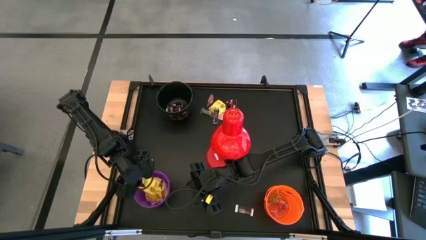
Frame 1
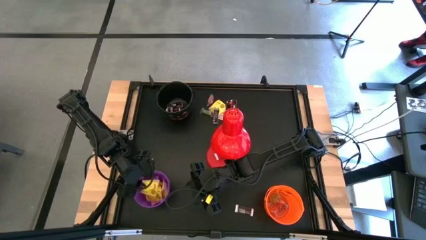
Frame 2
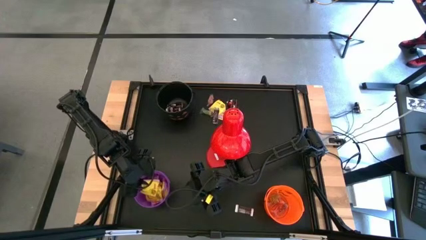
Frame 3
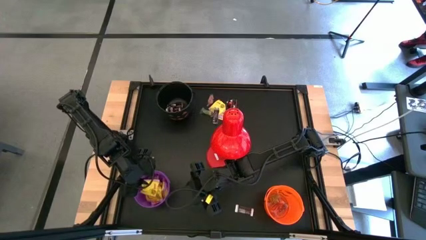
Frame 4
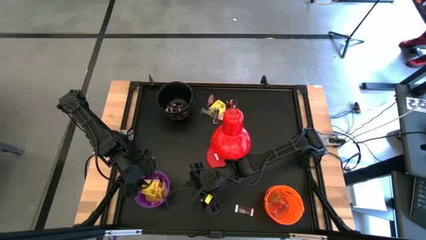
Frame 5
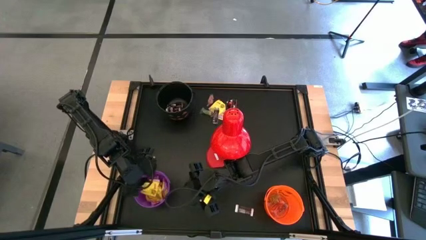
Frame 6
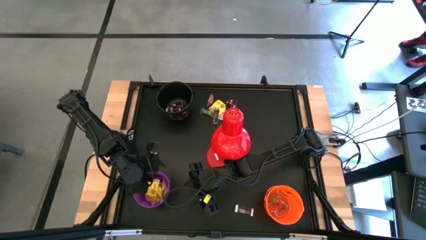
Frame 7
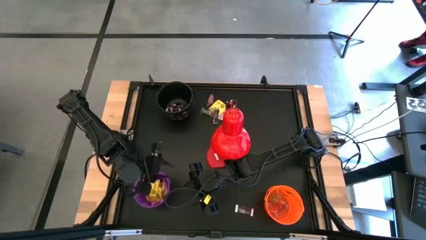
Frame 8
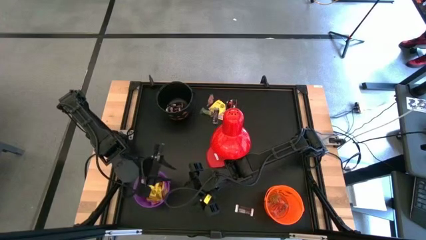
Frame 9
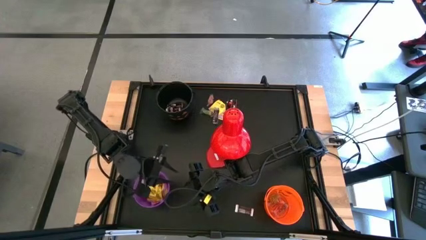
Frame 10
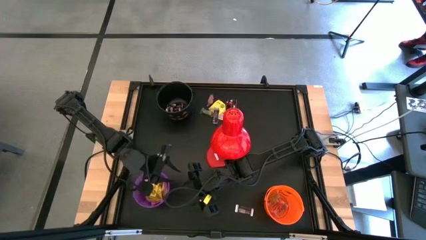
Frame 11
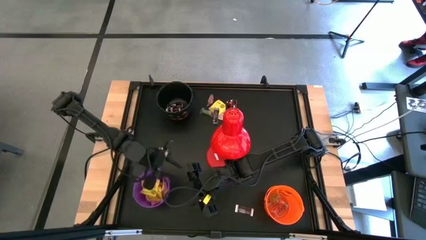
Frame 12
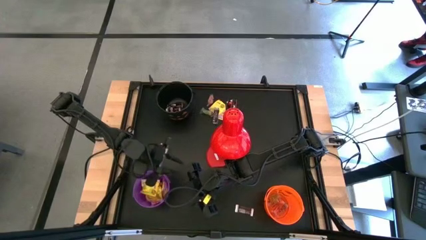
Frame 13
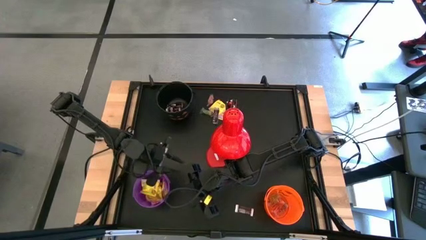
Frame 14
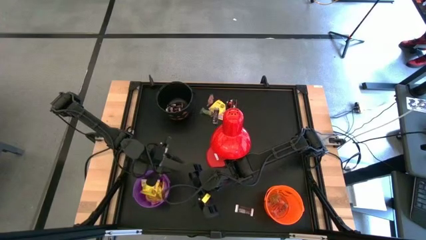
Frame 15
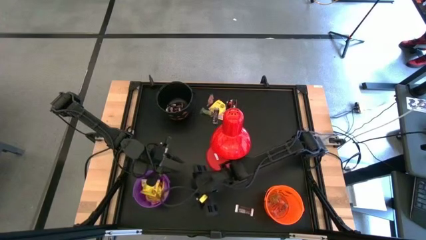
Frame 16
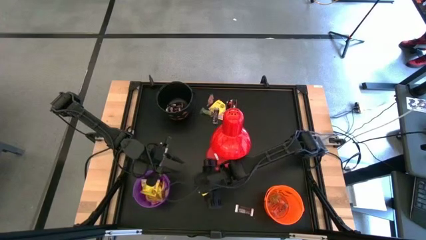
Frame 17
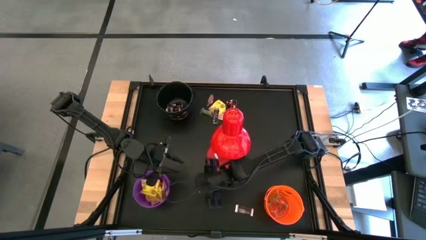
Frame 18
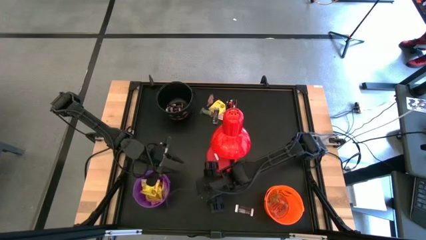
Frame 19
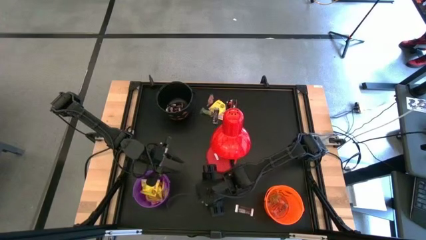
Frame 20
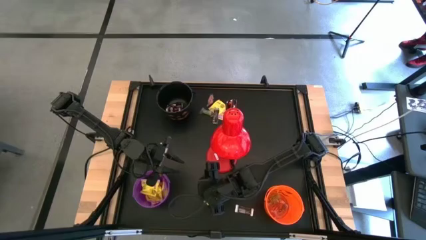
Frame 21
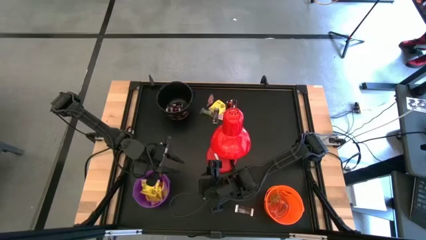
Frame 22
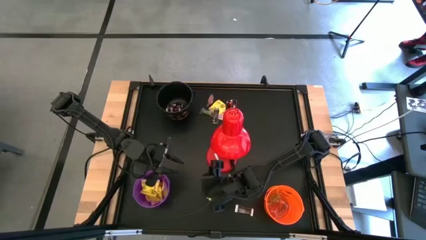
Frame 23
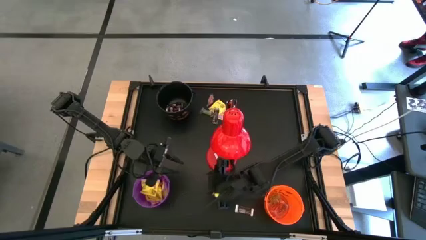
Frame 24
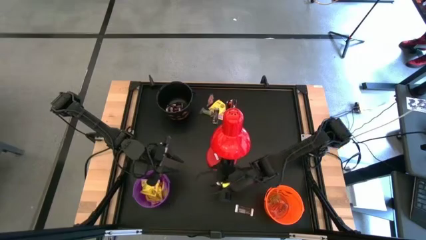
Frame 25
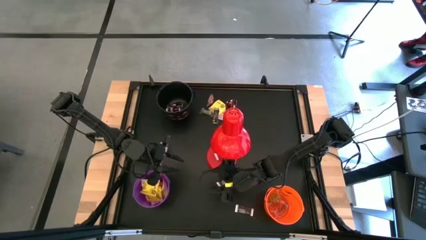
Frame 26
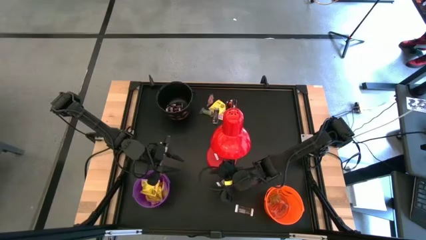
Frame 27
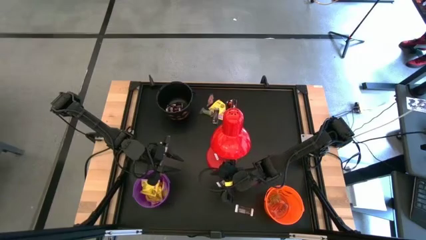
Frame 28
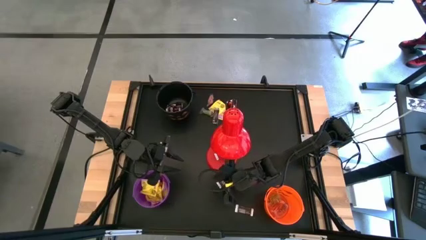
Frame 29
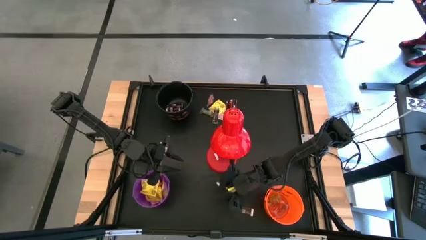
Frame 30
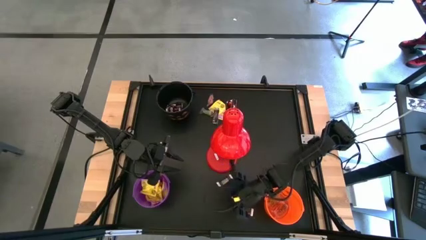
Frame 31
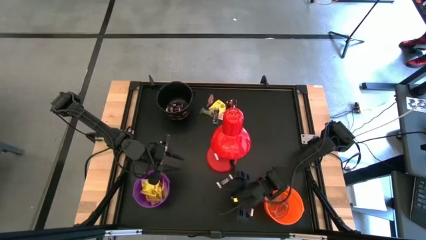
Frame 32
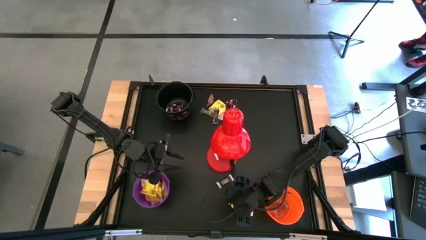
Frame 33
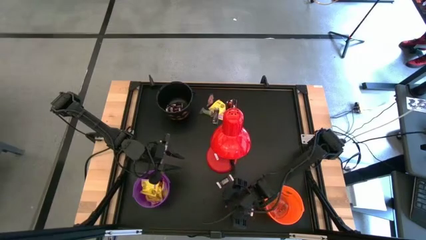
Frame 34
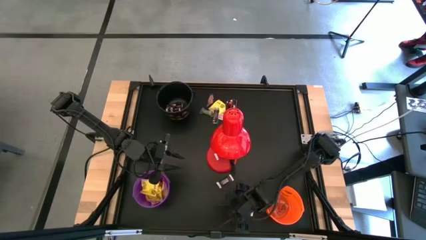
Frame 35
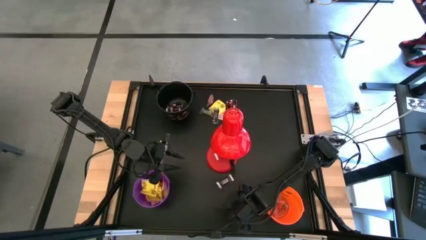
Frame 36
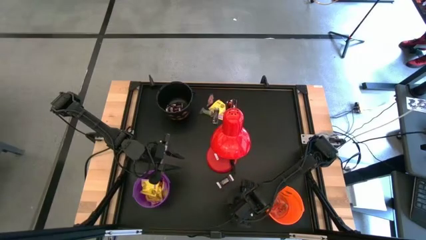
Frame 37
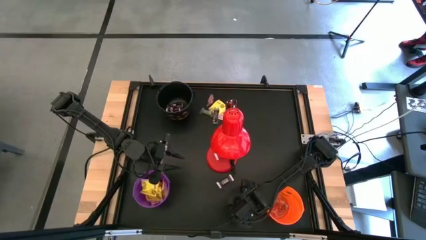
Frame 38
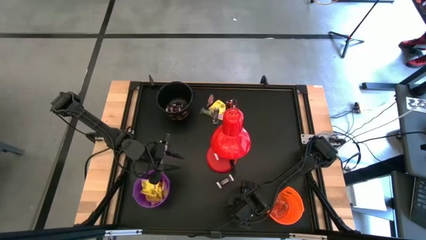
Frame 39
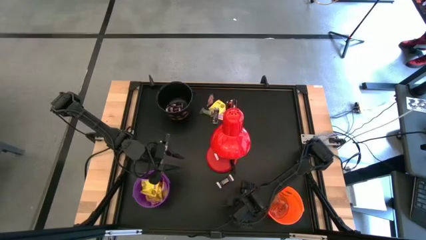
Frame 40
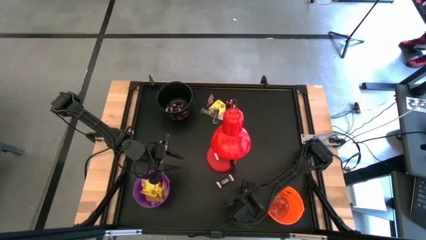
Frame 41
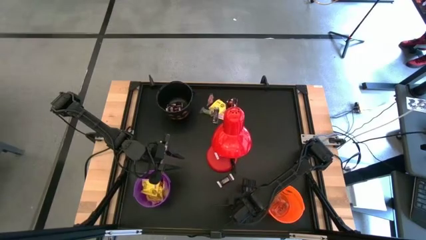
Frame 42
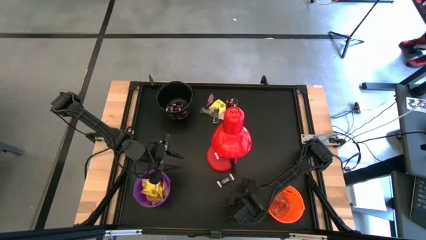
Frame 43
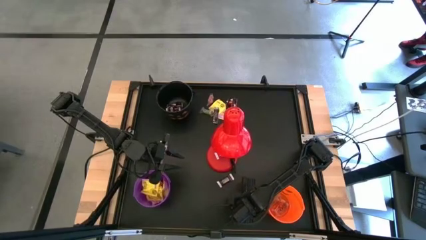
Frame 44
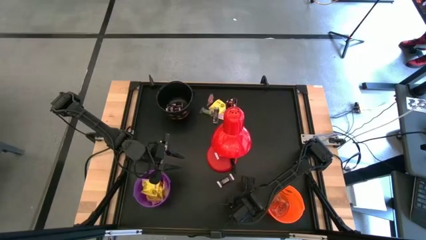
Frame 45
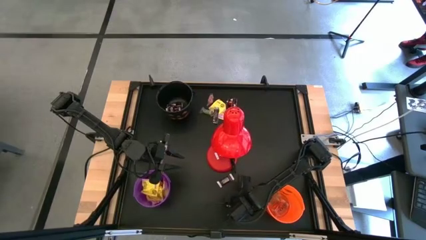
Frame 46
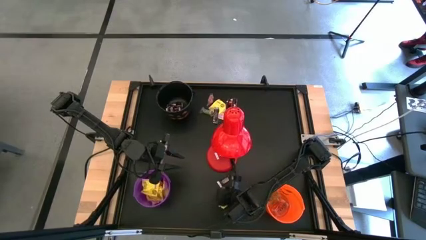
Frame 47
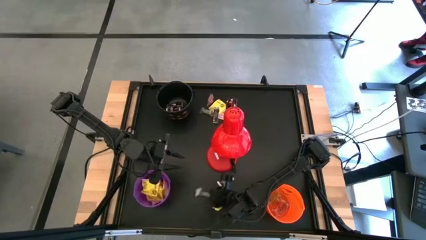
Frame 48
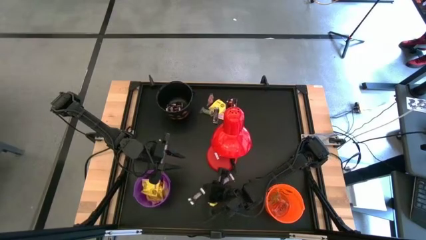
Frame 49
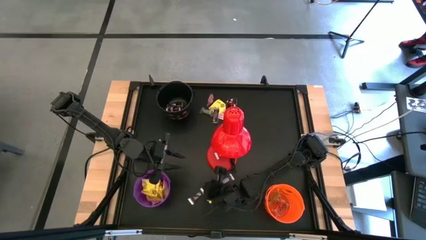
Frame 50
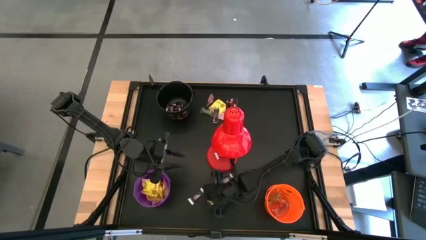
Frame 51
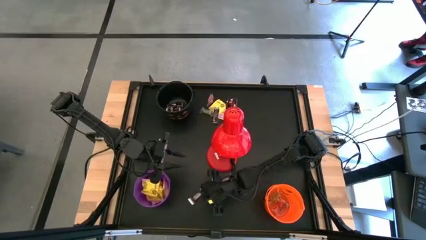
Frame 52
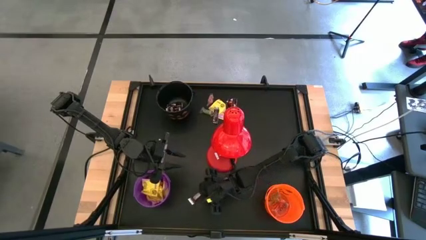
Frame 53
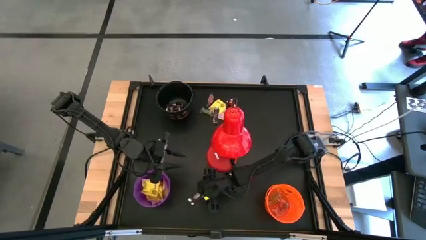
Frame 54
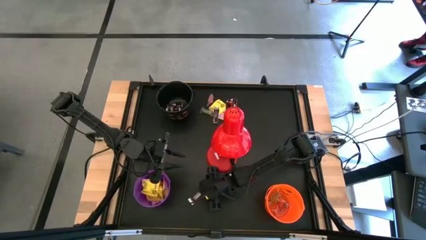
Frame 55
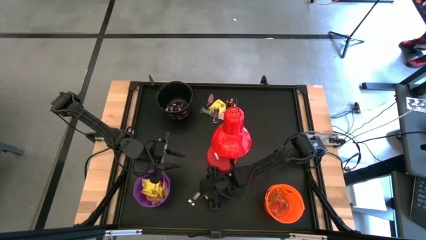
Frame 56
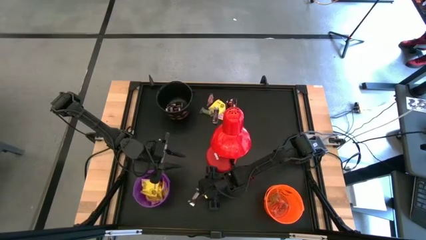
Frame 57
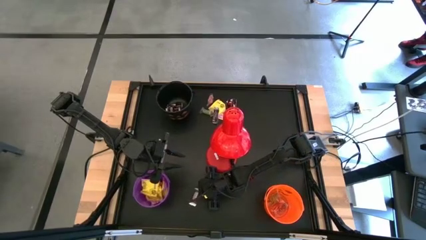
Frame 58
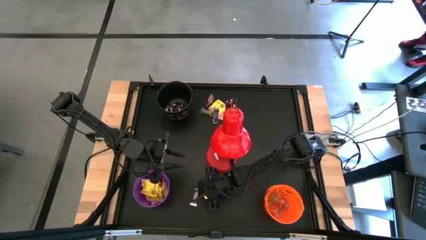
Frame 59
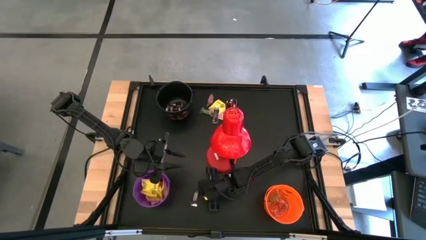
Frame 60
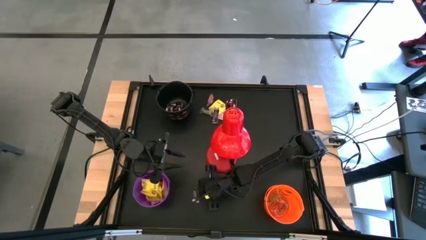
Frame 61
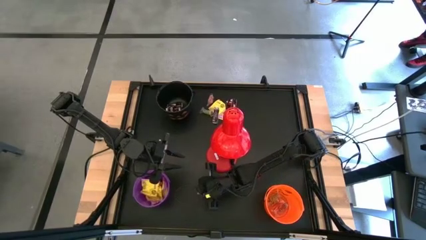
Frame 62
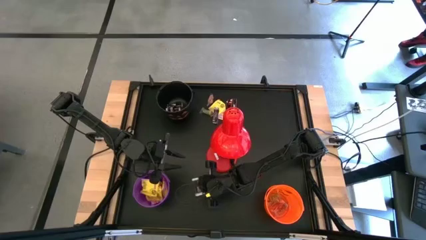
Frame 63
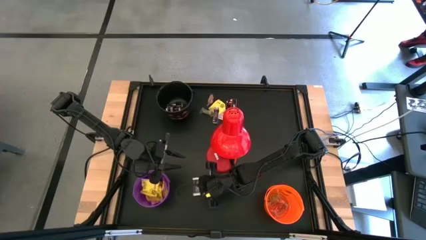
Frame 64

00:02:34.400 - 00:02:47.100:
Task: Organize candy in baskets
Put the brown chocolate bar into the black bucket
